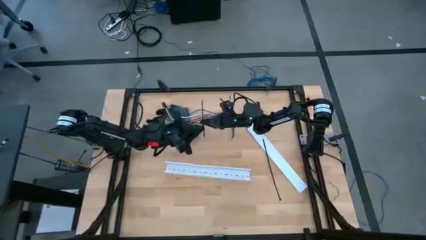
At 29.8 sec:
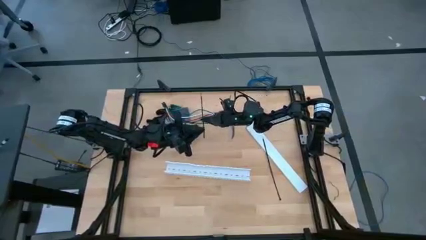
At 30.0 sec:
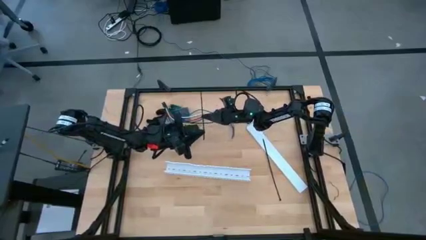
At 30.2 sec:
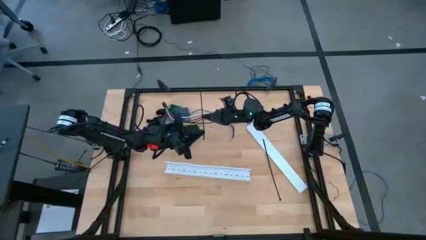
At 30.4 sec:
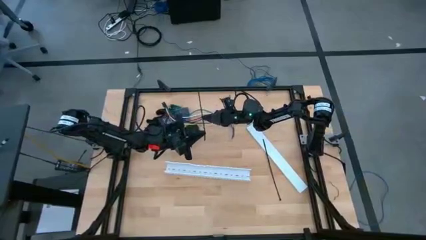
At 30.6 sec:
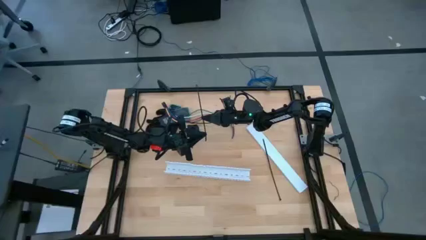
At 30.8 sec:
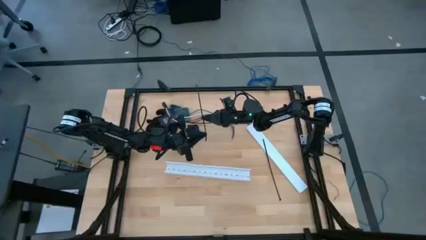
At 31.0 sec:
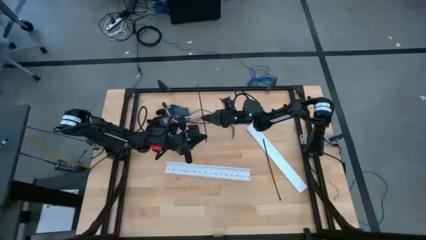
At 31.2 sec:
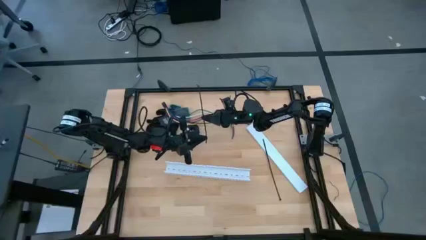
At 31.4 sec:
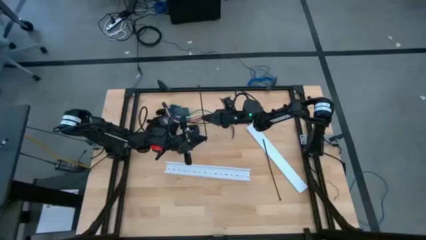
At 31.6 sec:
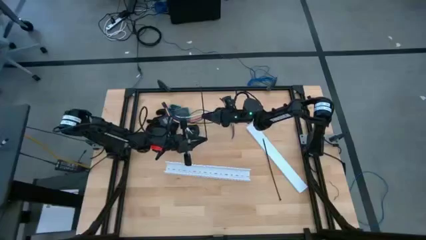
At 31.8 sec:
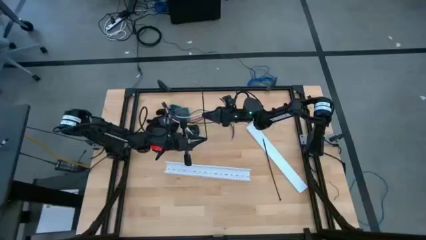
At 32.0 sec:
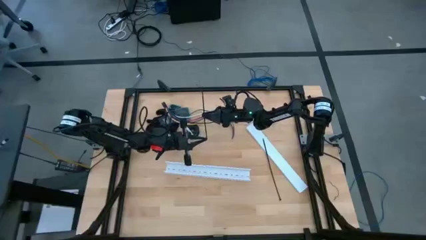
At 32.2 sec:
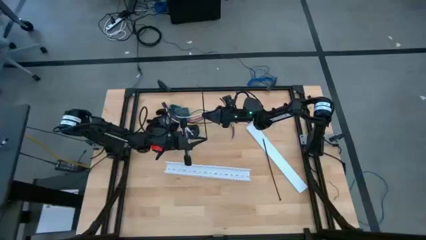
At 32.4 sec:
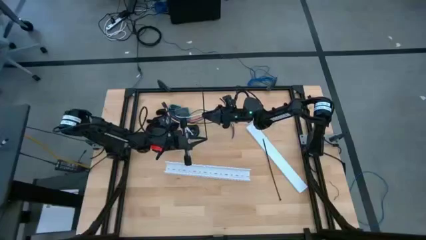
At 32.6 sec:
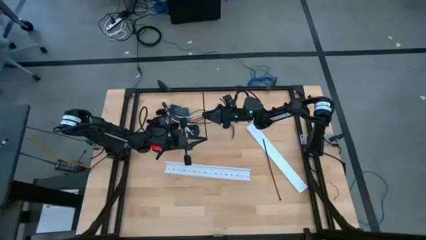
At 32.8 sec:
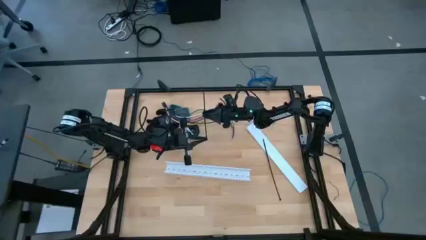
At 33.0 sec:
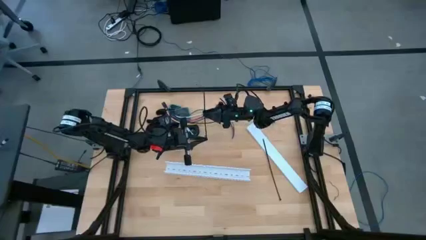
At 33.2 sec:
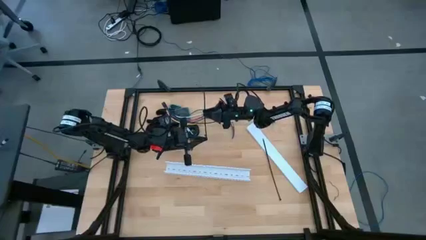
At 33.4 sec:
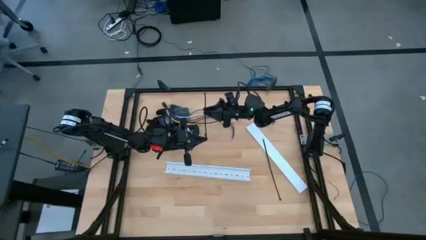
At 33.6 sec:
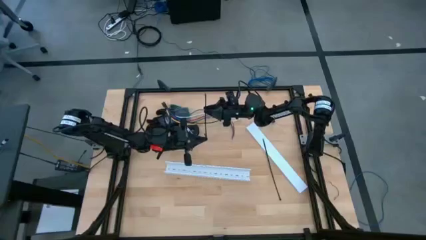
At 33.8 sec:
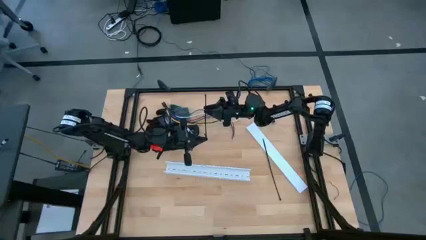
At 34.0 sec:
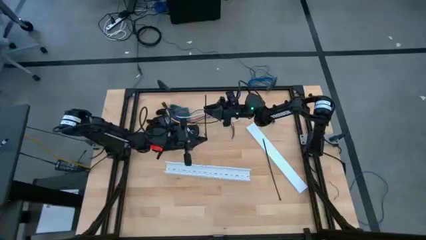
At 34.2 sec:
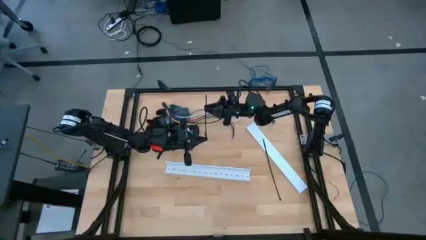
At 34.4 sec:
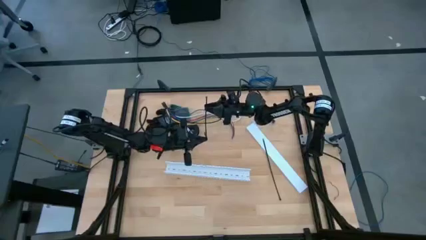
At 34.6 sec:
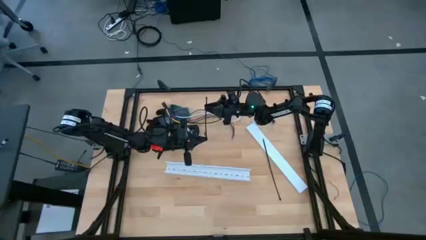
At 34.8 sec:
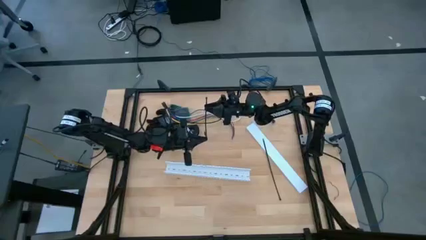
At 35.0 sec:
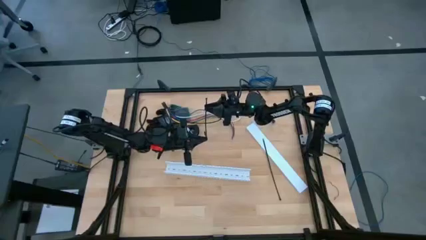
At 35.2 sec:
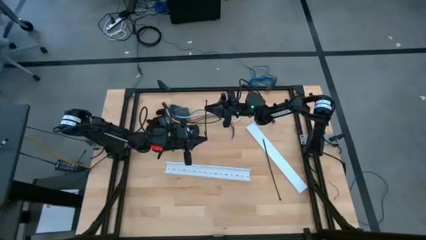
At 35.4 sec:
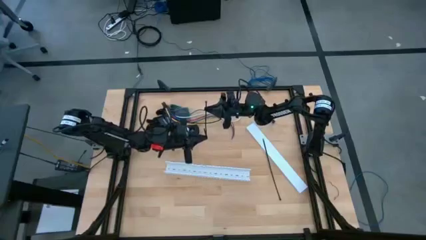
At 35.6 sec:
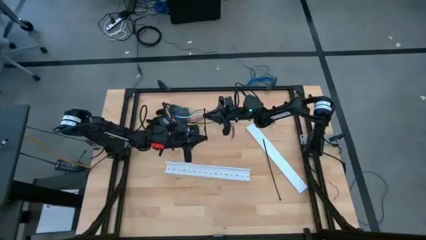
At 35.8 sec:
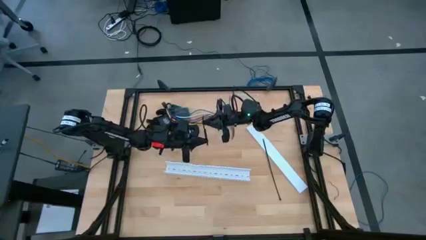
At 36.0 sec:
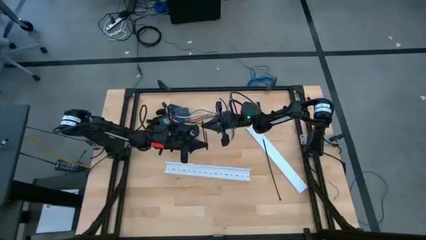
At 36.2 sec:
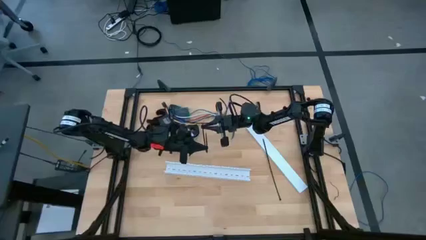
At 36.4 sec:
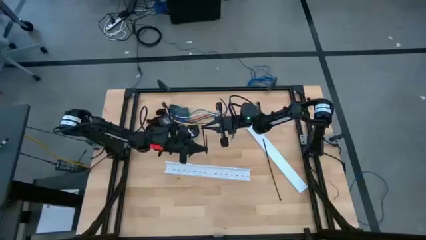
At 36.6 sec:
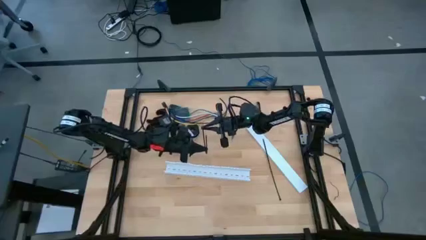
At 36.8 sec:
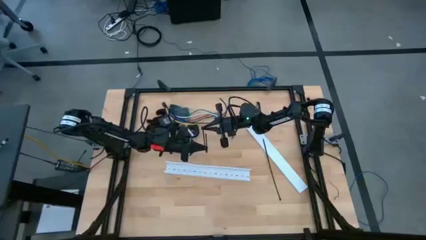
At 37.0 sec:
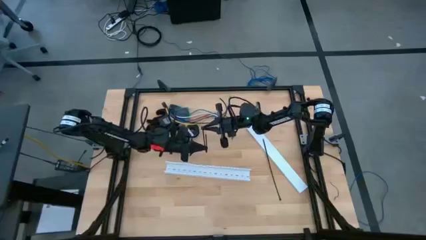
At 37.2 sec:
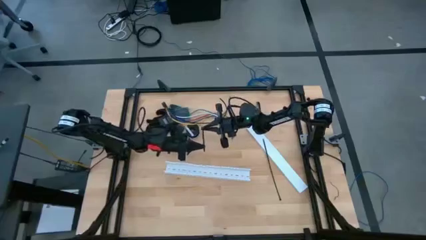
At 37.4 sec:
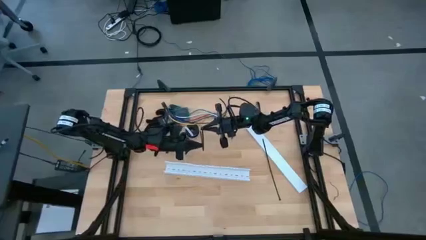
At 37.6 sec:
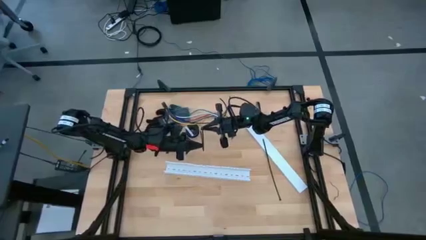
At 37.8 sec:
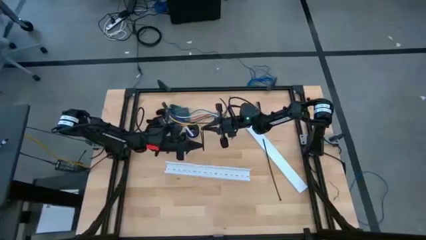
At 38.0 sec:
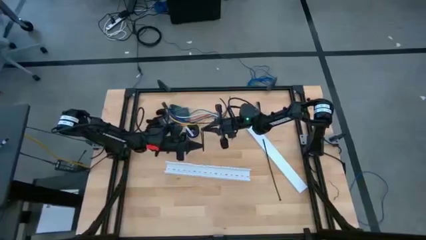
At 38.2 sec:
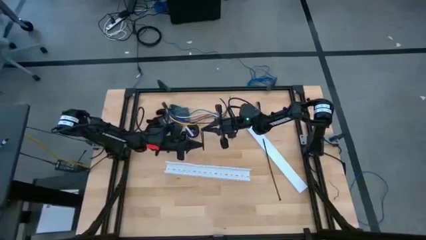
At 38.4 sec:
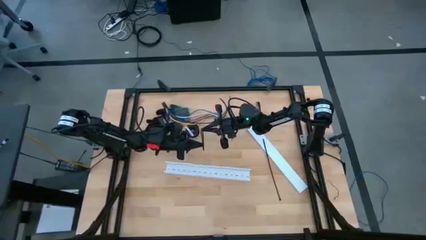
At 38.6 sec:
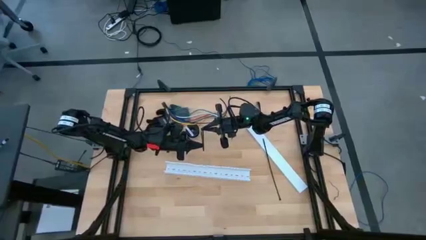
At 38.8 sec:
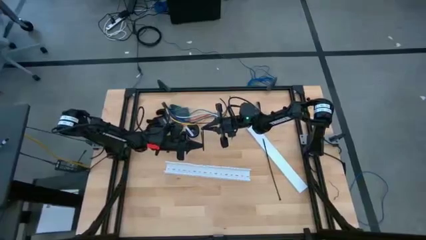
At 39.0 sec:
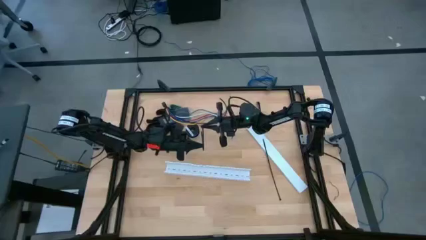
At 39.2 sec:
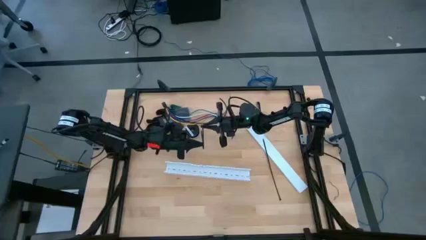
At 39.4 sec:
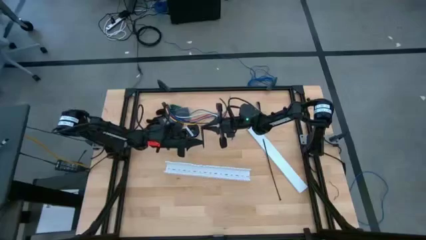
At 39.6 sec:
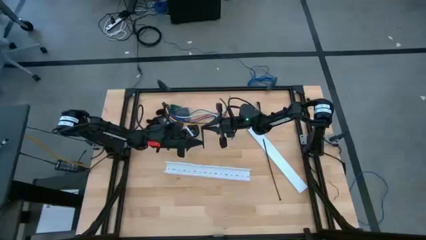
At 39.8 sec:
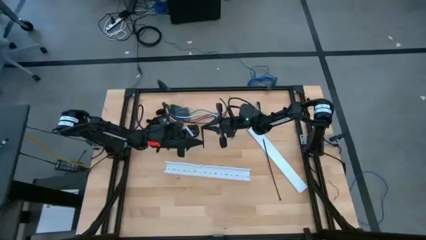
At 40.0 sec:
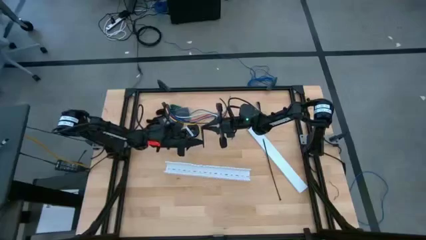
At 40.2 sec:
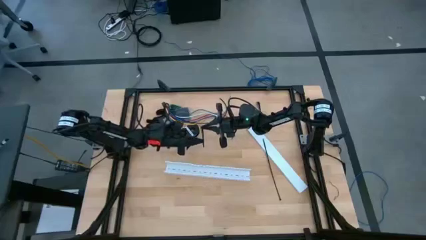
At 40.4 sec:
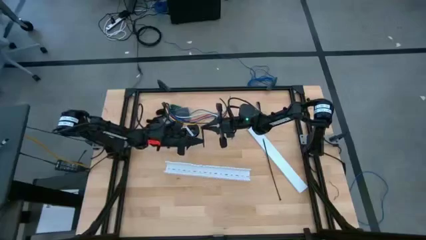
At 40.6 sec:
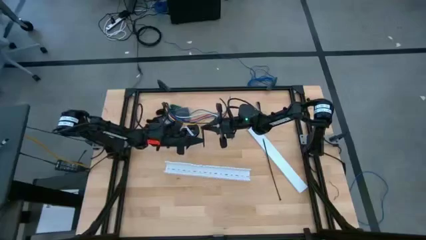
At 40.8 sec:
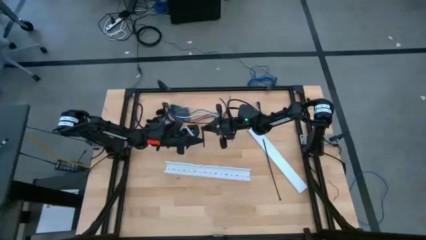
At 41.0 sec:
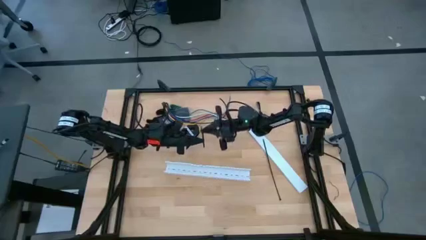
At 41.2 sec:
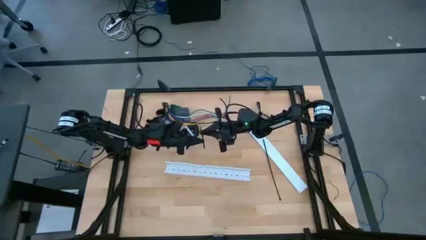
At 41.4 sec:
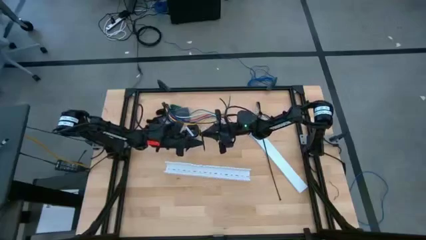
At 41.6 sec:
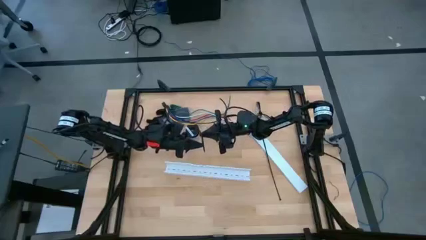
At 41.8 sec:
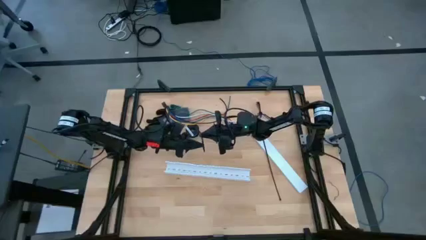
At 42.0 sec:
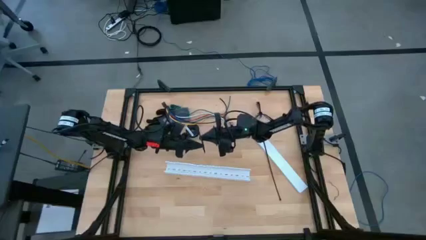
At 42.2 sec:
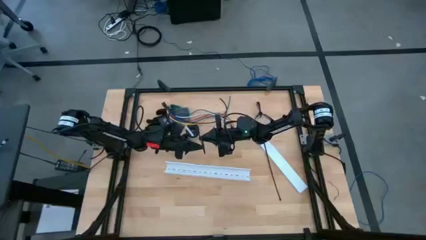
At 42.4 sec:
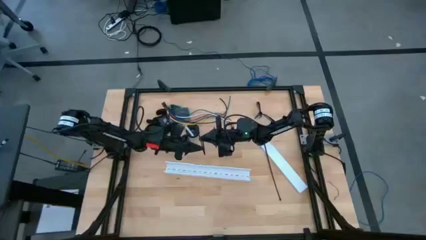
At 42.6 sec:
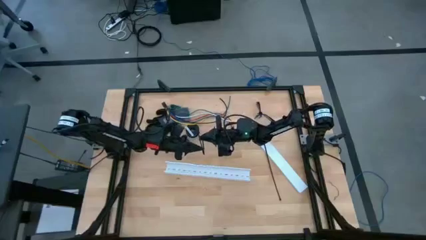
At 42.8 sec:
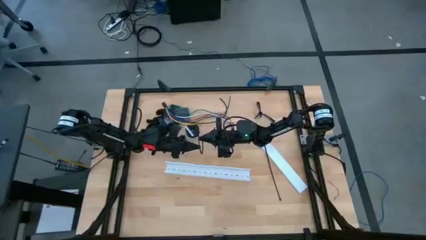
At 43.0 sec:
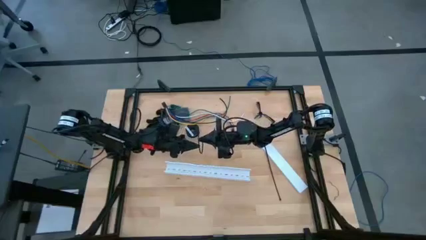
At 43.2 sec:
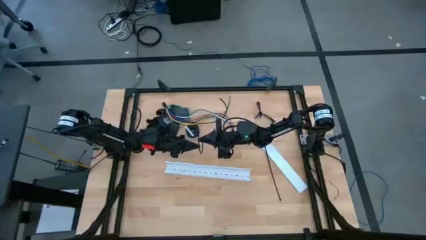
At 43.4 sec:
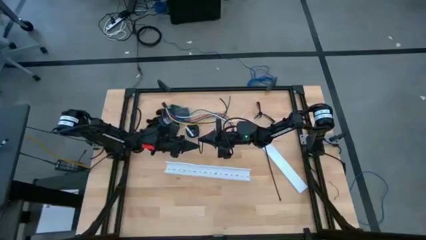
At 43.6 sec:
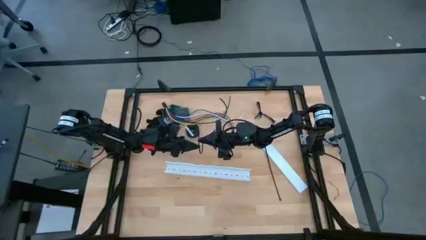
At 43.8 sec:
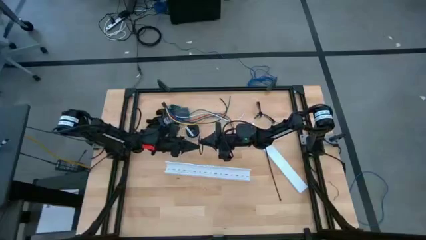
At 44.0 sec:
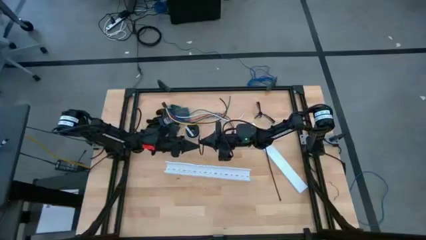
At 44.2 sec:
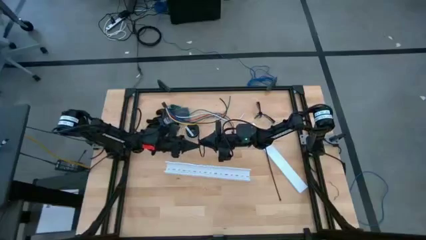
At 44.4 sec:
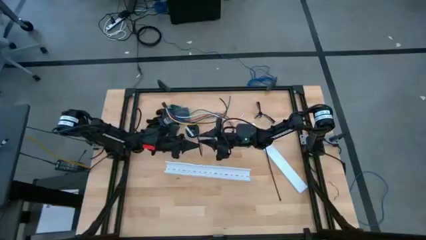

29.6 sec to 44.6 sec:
Task: Ziptie cables
Wrap the cable wires with the black zip tie
